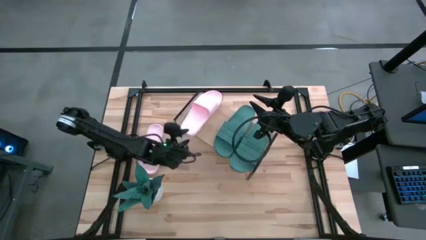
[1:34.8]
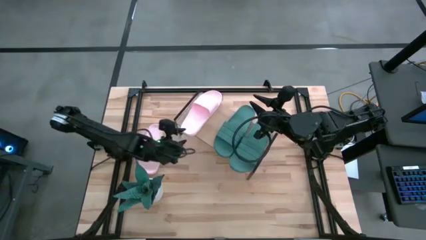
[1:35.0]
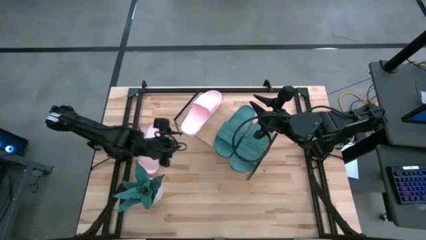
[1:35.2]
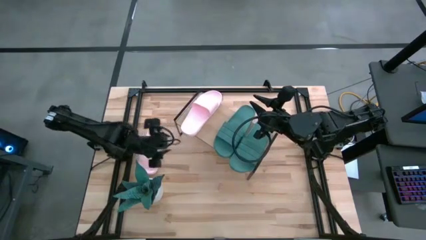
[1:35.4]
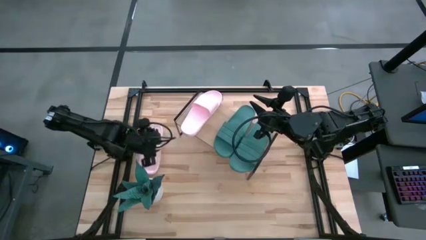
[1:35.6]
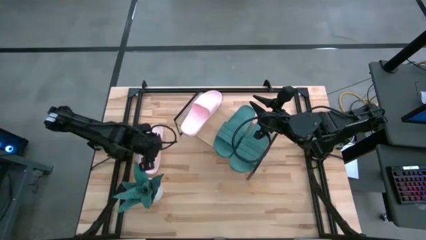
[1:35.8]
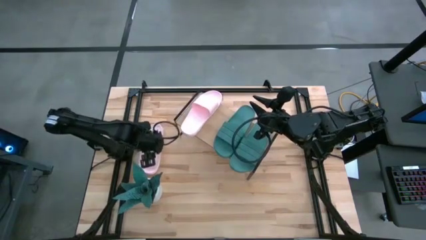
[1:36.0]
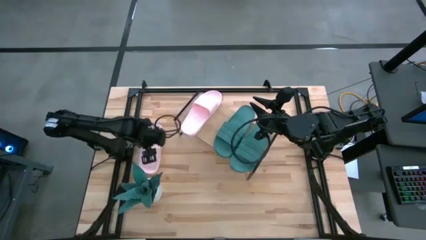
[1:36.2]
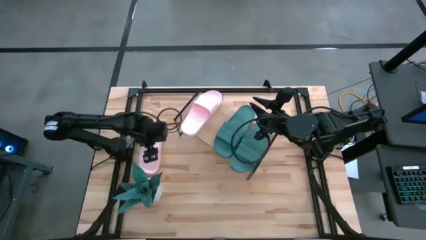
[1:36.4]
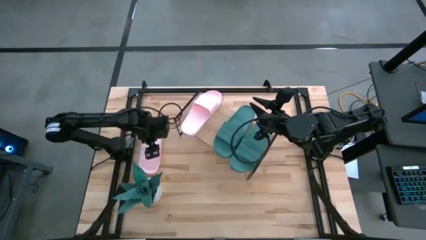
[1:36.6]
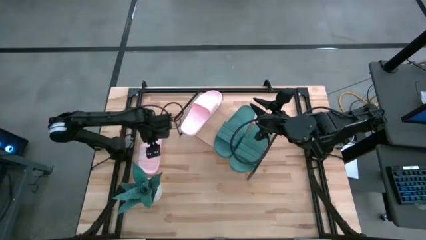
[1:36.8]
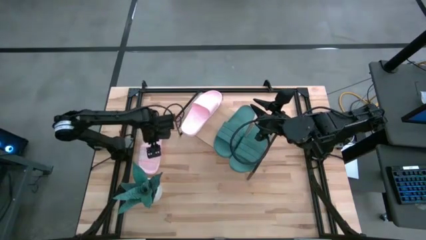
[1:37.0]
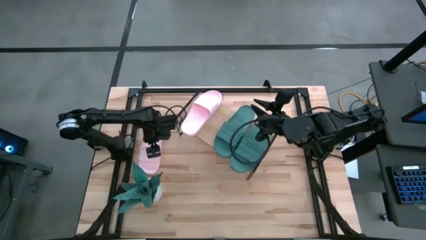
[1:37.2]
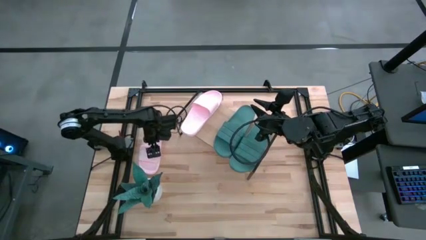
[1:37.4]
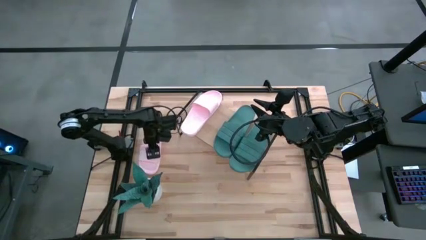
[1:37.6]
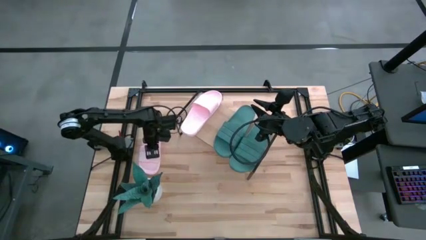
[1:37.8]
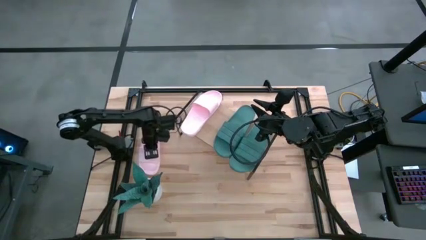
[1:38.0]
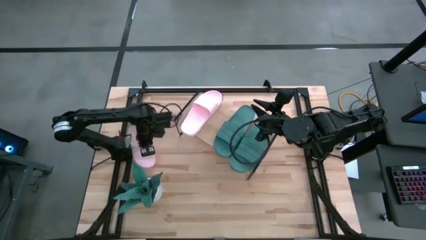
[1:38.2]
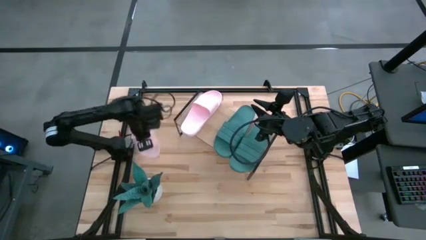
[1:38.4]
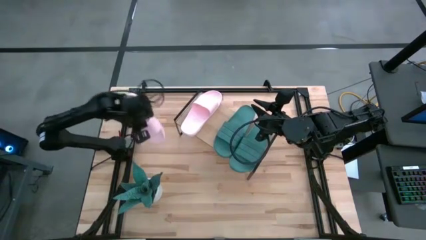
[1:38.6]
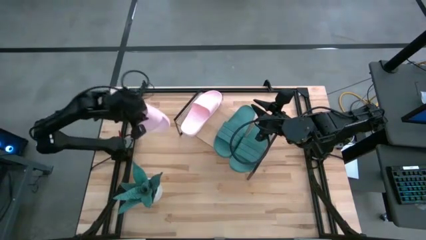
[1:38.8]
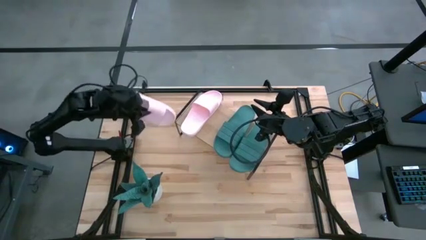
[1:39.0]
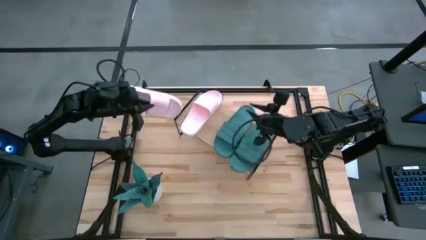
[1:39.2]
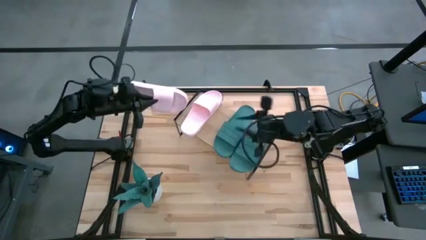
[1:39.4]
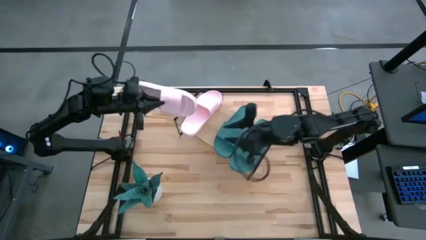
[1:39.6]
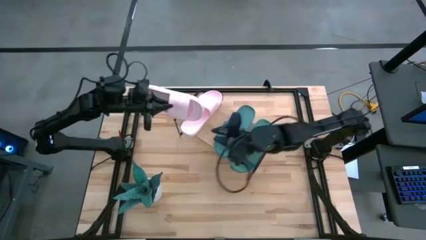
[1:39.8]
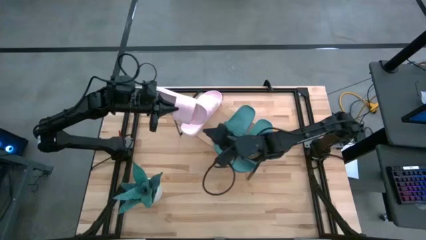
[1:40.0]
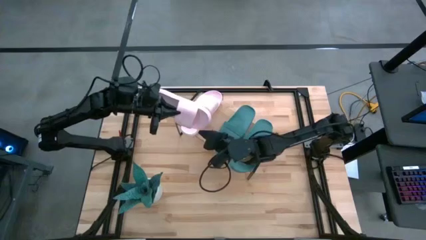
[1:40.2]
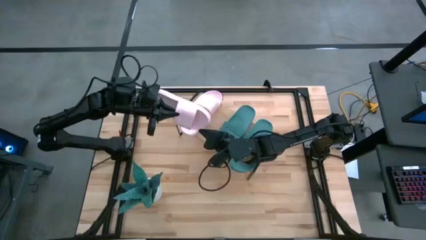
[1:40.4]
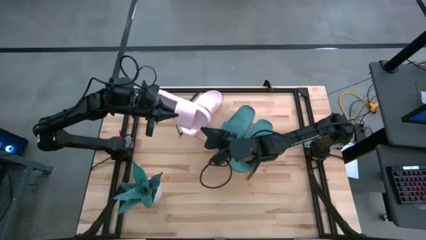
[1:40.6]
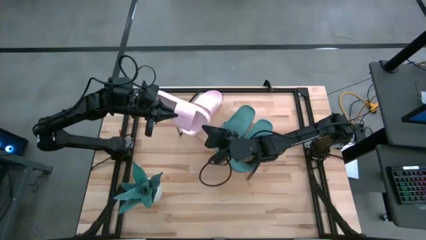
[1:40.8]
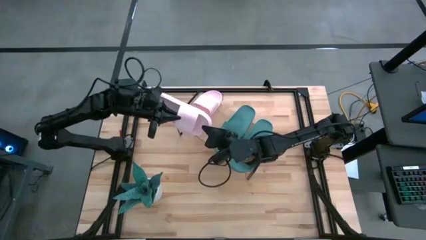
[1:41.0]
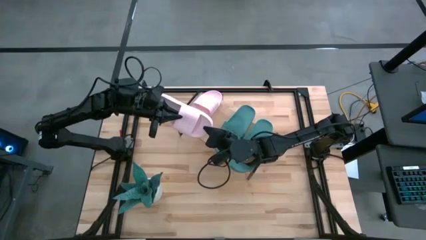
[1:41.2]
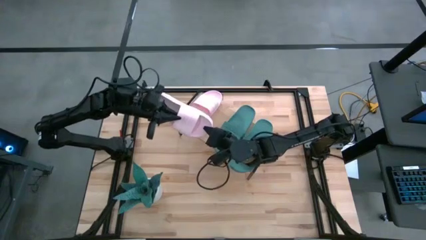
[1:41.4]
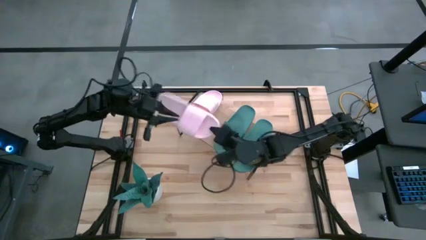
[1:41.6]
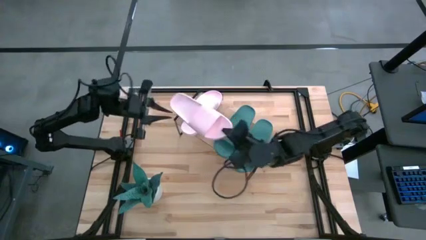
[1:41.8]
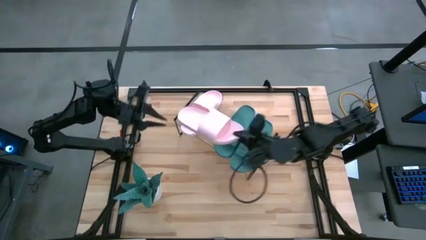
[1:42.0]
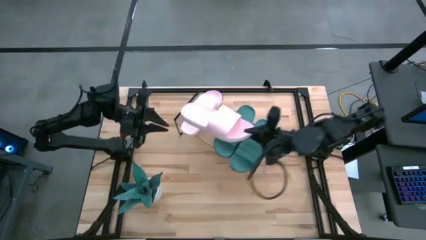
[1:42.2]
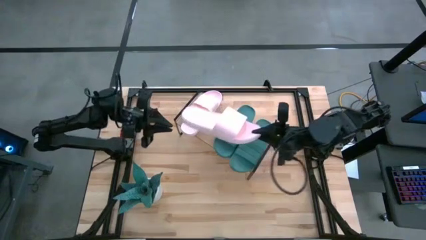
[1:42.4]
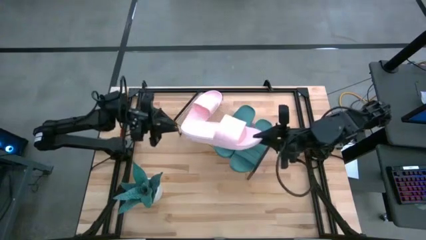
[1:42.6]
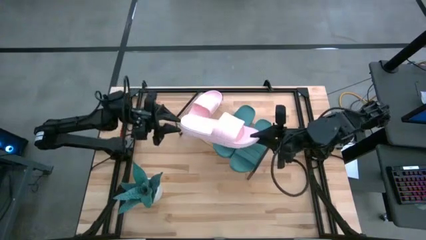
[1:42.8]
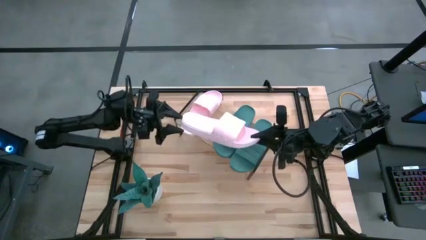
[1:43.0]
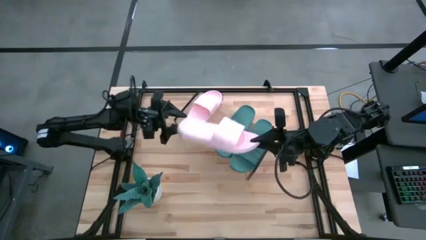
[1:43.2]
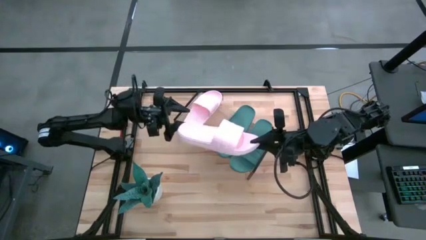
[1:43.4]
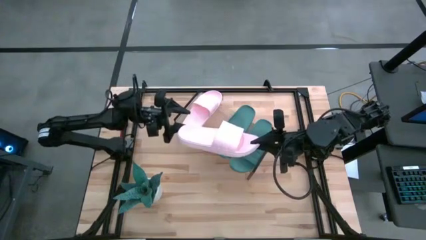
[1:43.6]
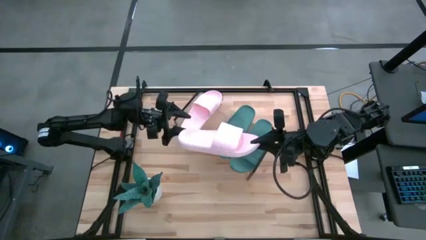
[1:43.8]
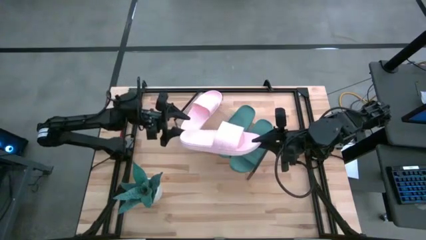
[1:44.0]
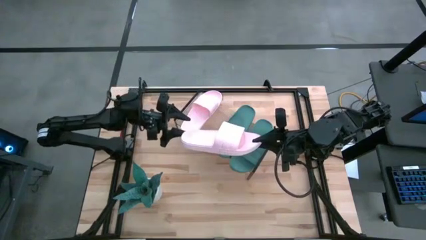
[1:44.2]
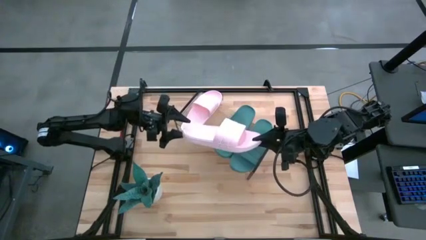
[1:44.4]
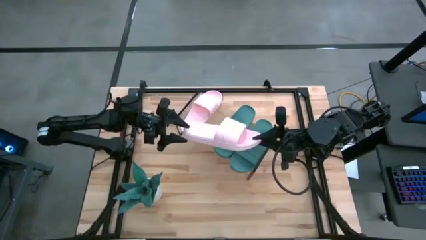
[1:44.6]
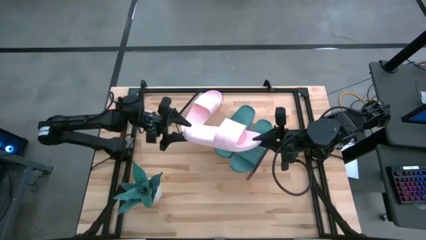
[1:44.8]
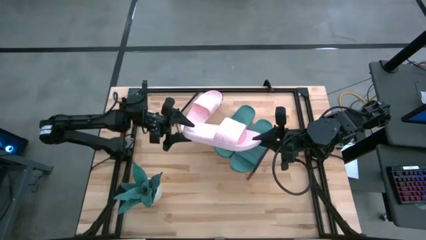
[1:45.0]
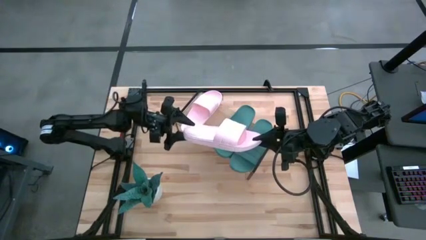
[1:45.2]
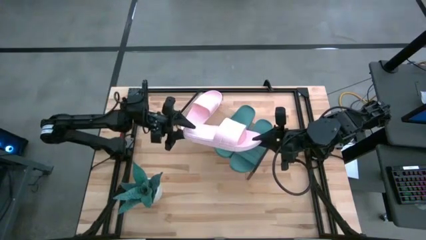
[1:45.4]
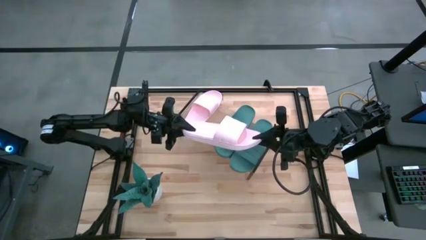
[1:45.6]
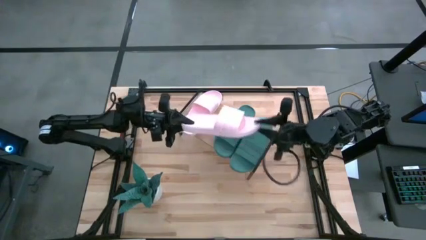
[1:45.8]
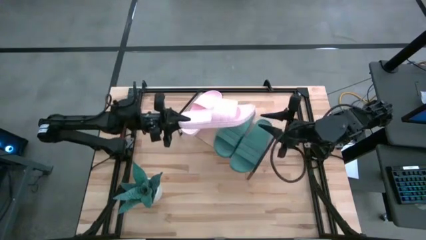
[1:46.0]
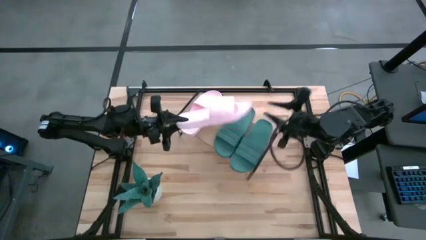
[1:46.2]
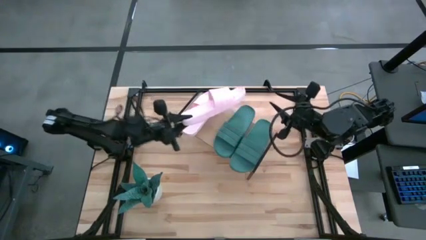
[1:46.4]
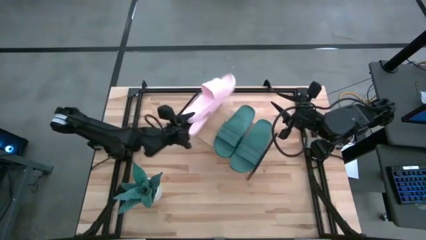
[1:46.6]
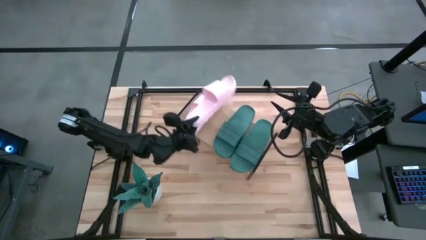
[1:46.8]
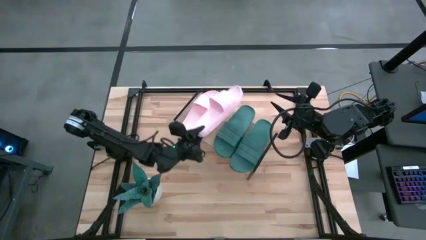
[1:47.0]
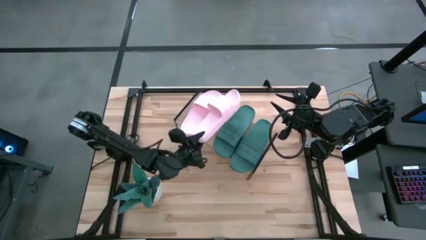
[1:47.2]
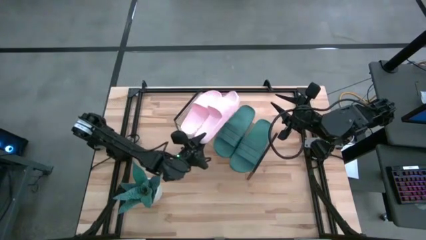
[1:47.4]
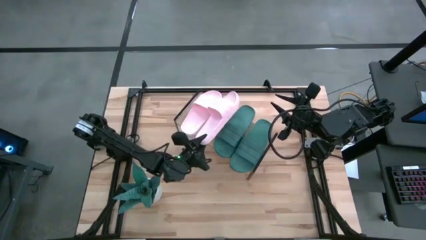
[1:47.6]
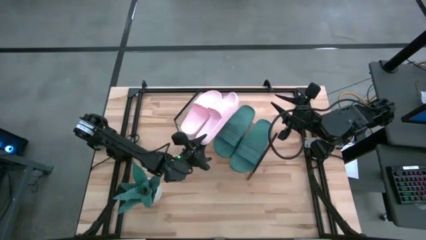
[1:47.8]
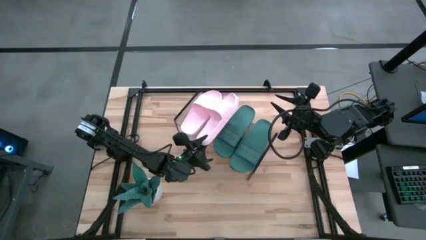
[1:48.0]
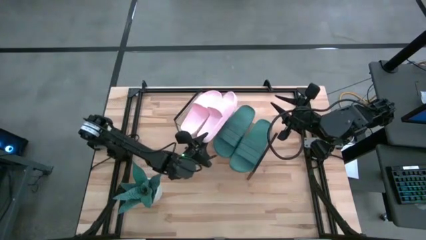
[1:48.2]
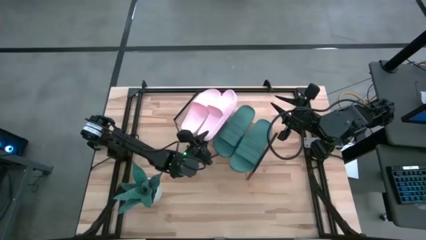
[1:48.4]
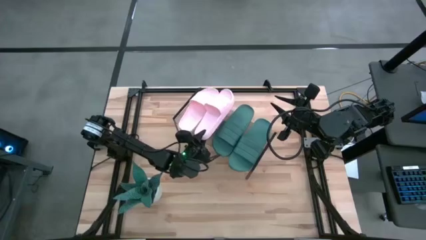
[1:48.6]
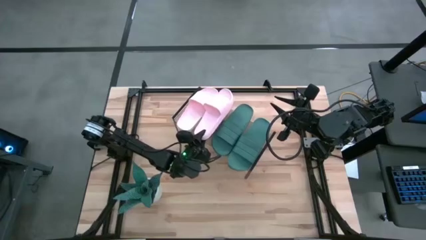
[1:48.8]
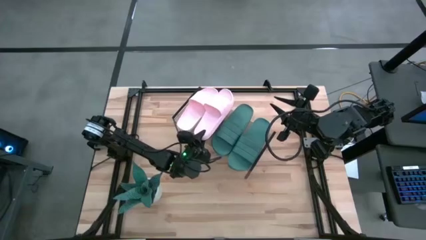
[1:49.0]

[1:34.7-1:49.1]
Task: Pick and place slides into the shelf
Put the pink slide on the shelf
